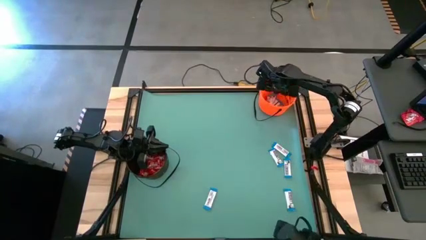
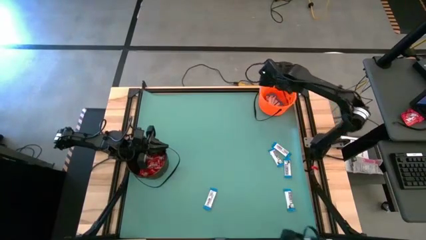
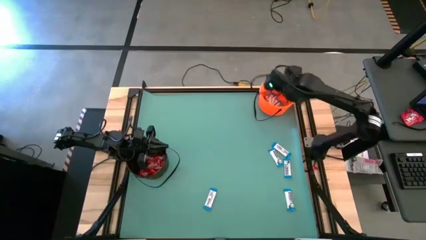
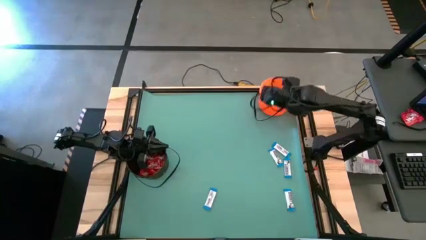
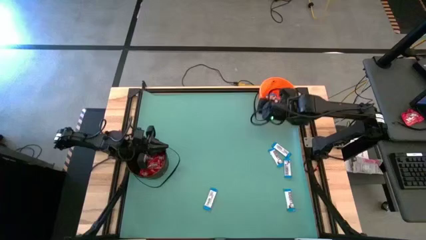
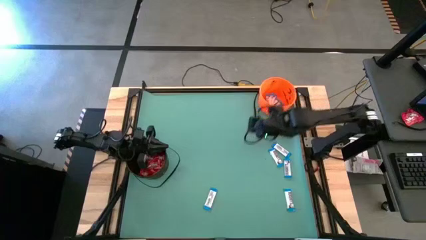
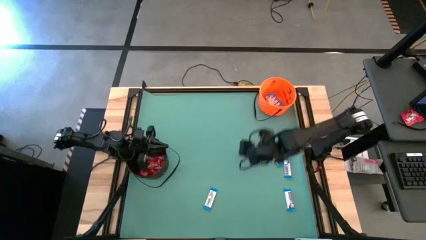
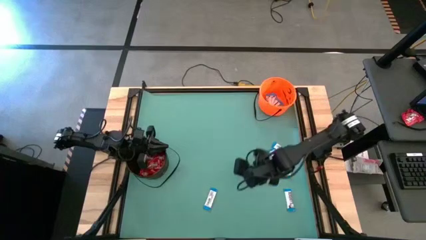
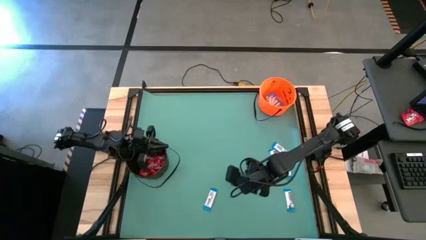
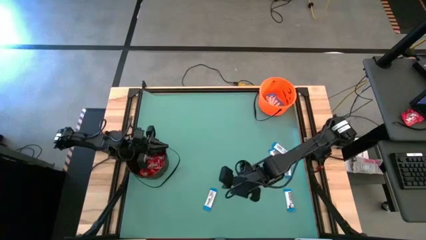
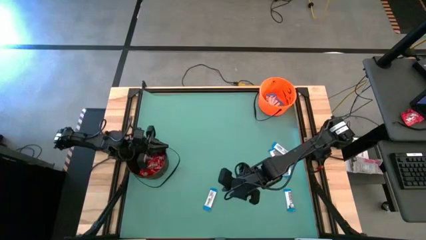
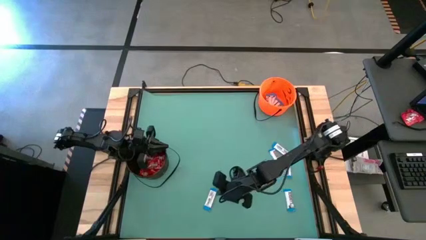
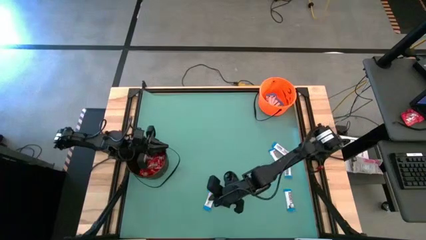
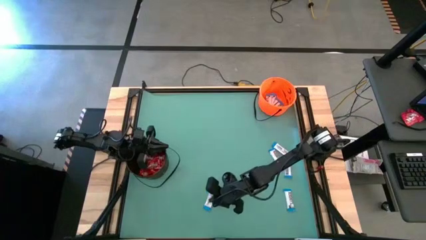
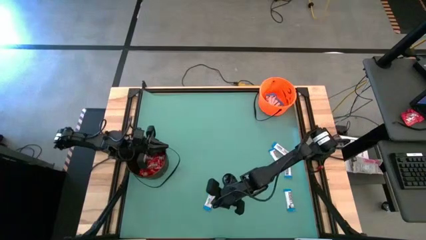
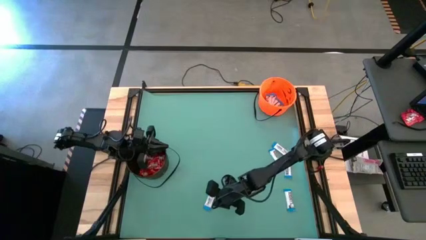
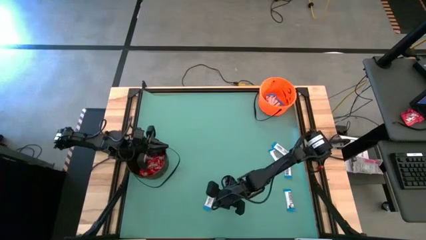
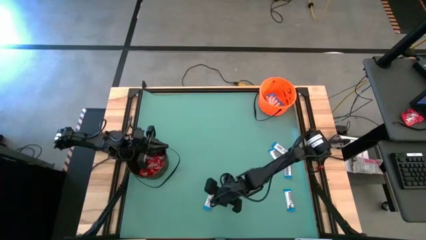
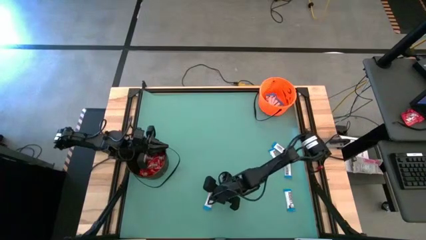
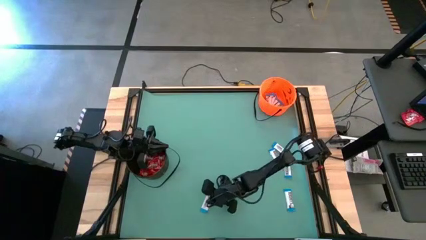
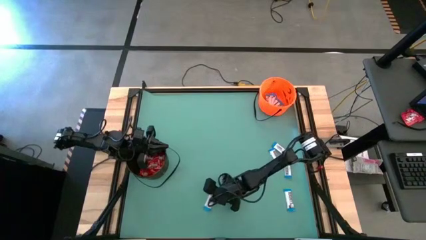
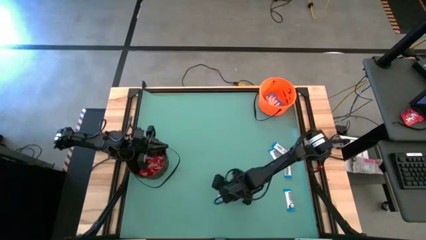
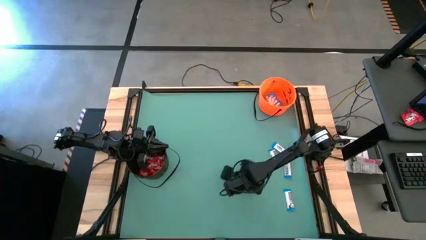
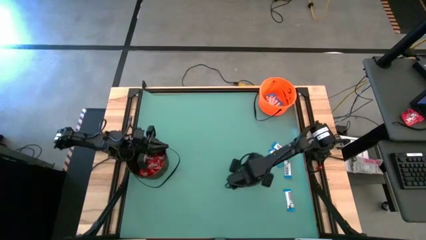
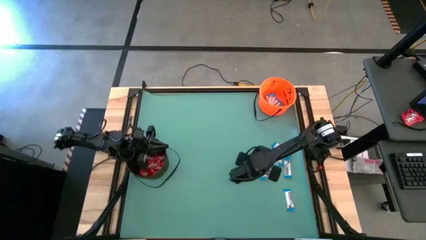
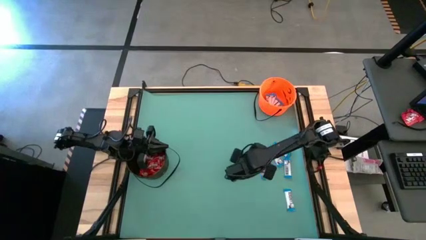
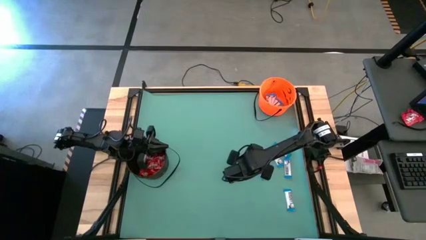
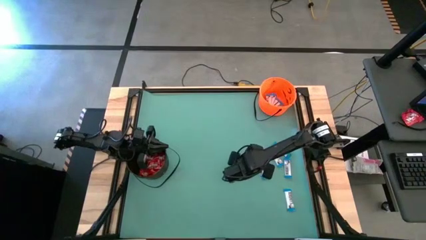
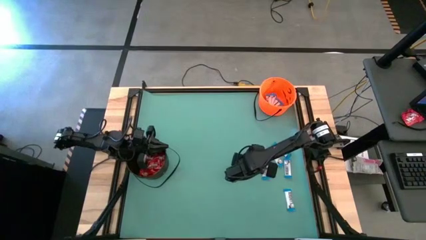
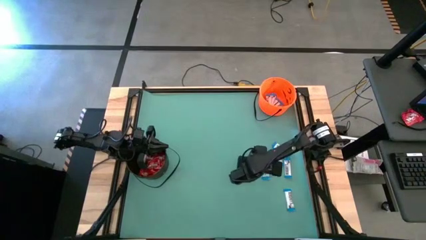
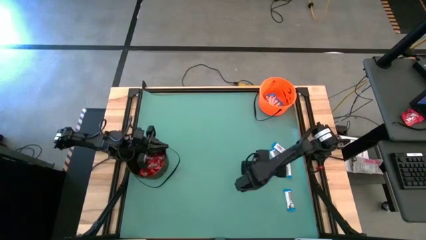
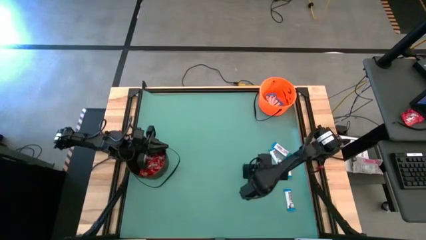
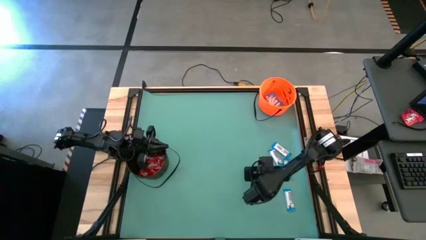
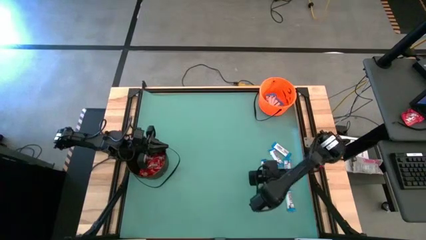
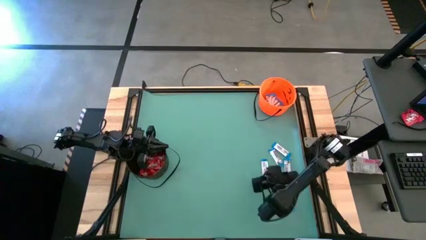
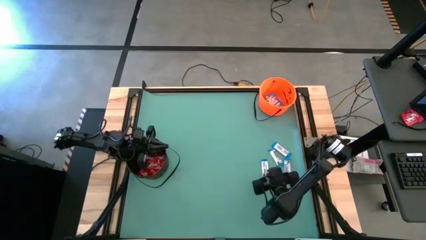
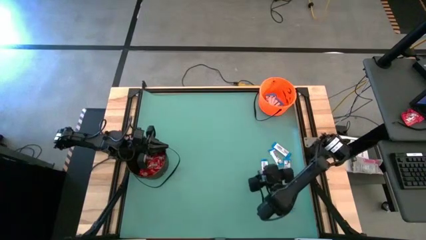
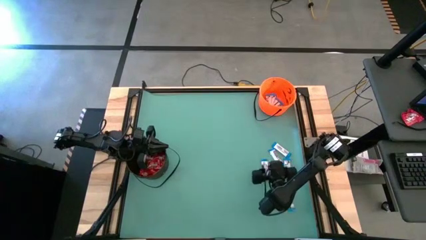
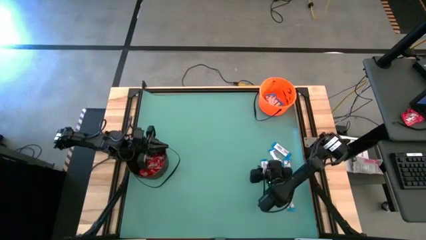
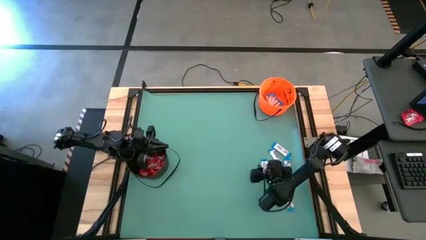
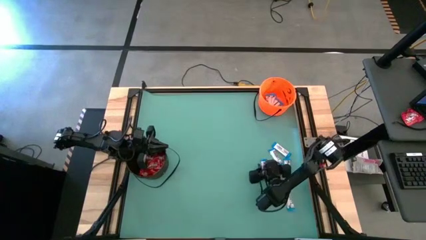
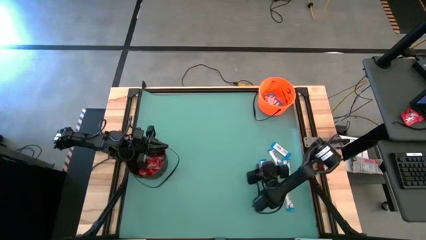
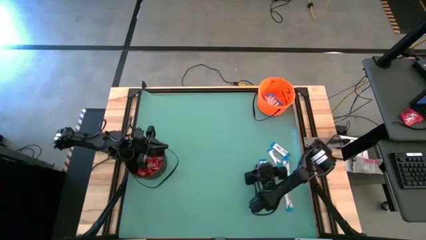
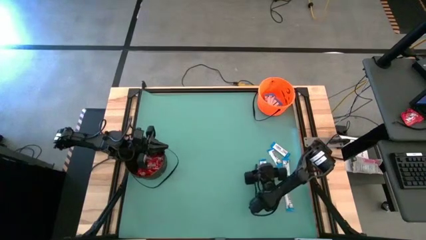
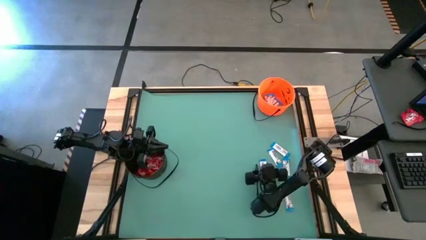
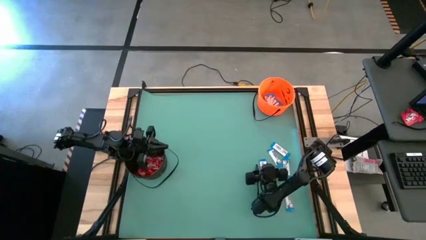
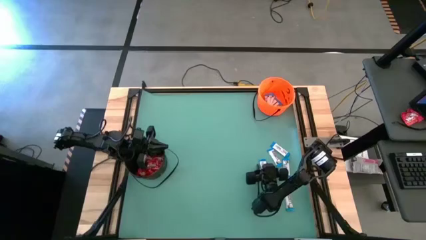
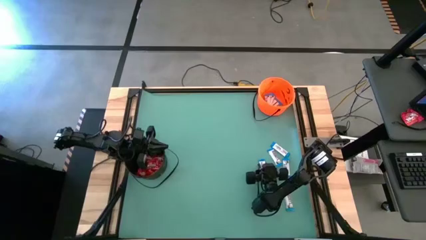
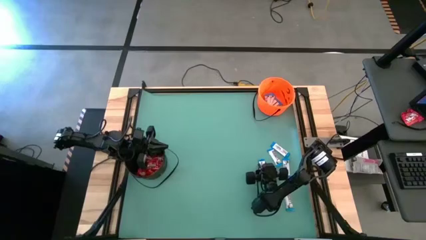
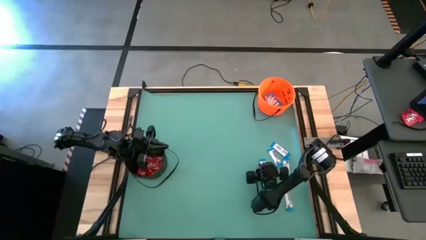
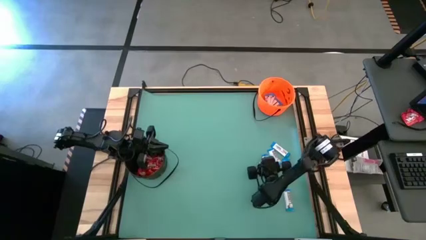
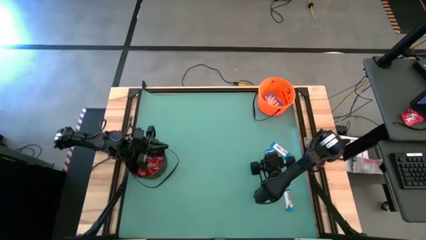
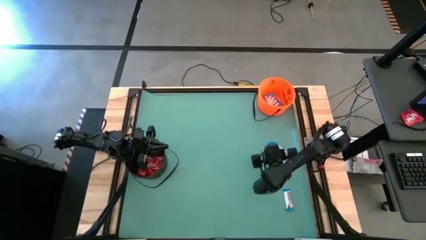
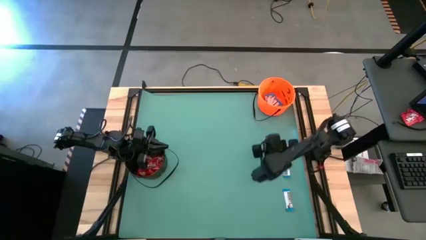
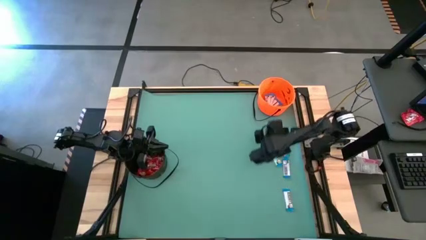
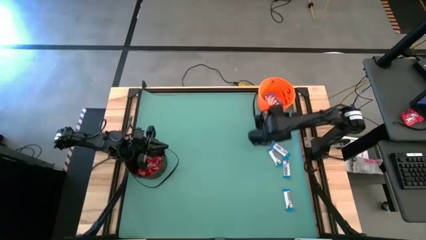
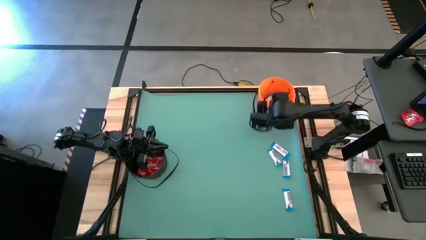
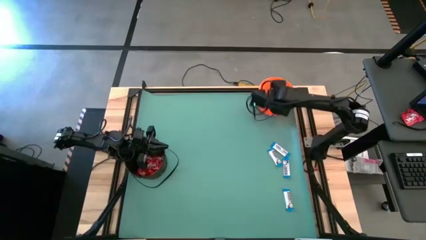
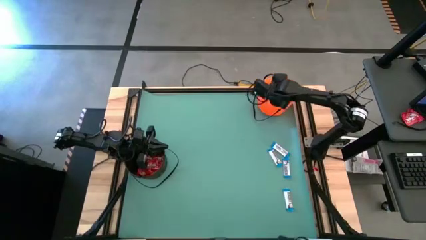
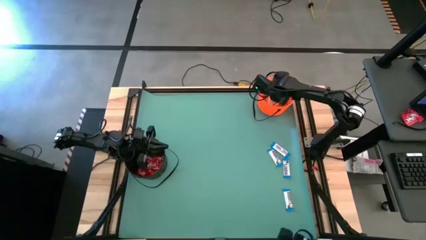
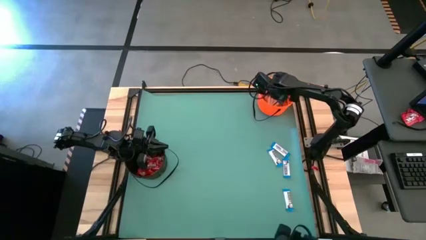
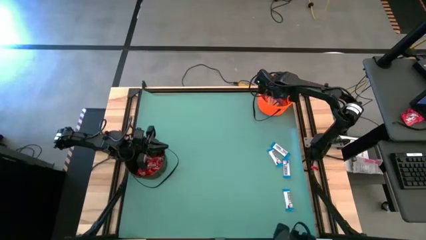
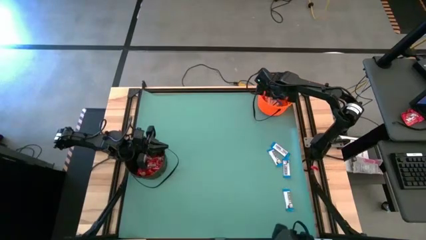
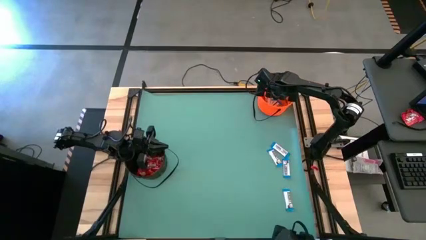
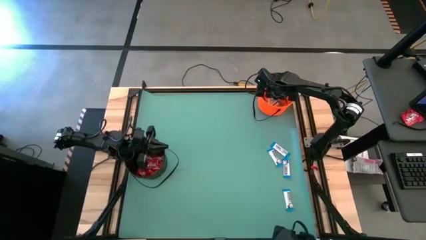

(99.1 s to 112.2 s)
Task: Sort candy by brand, put in halloween buckets
Put the white chocolate into the orange bucket

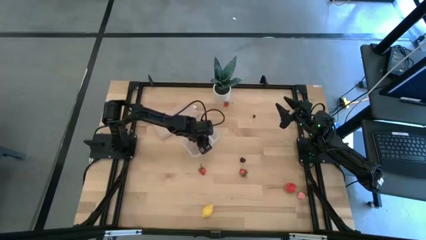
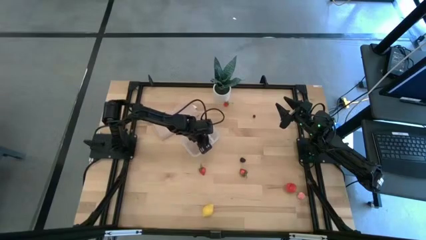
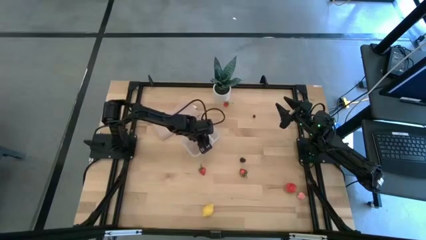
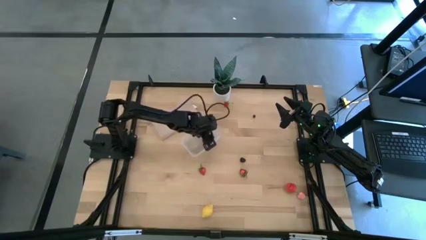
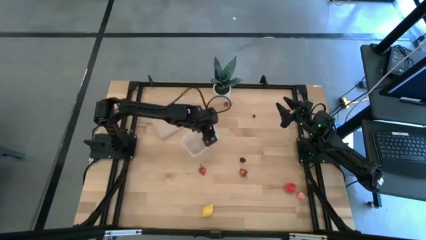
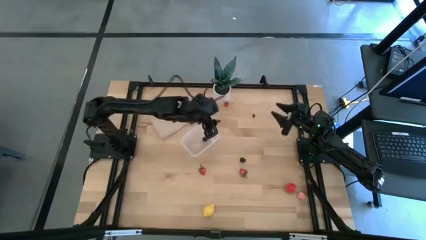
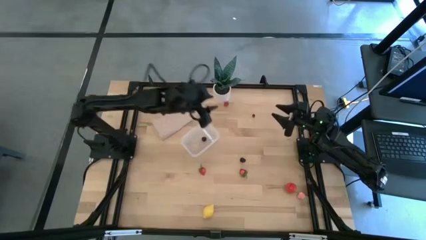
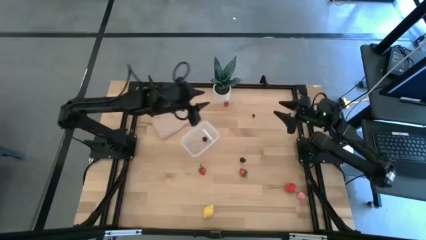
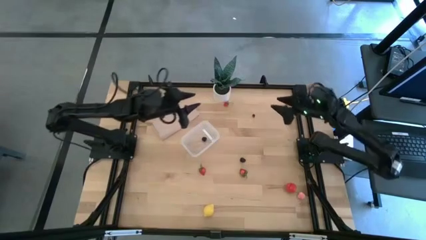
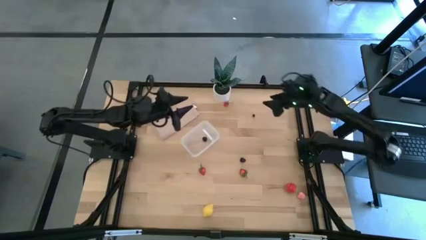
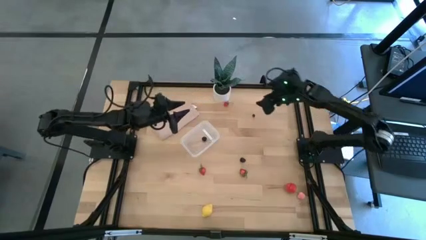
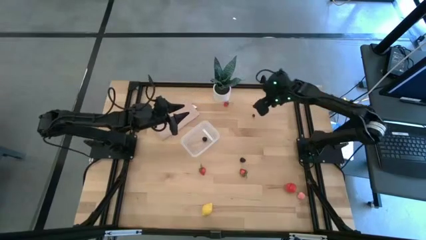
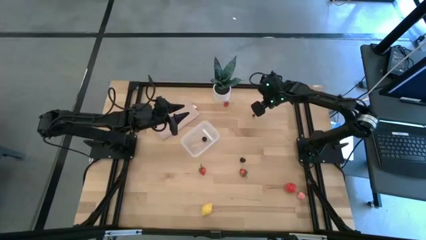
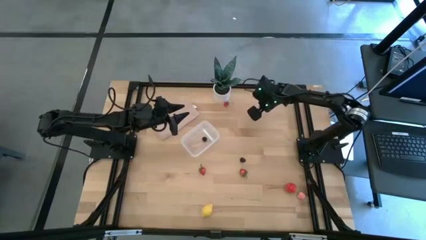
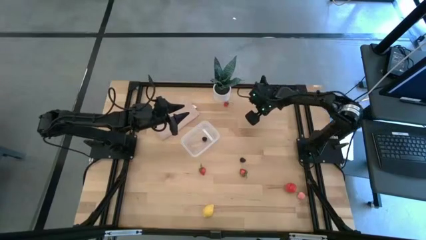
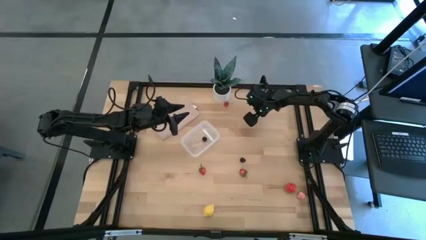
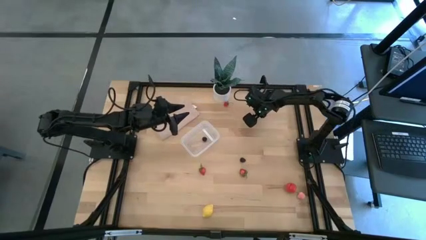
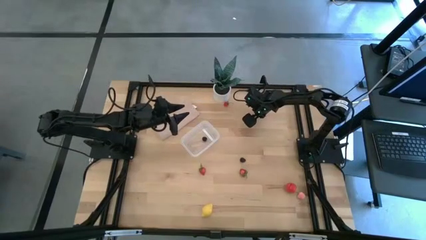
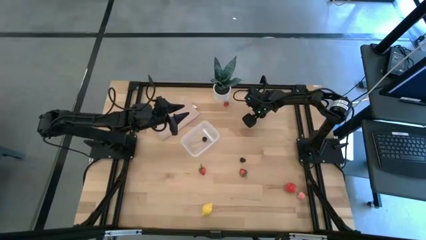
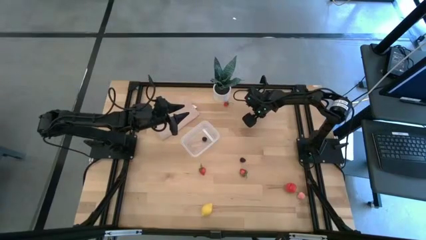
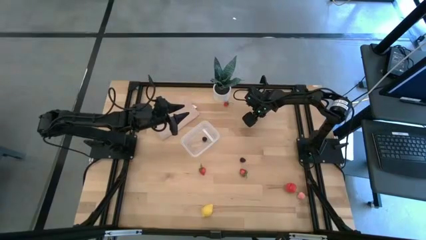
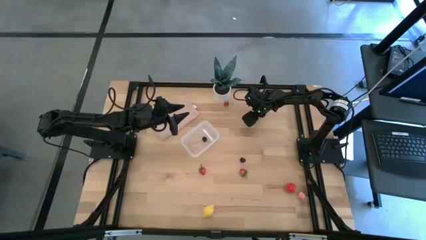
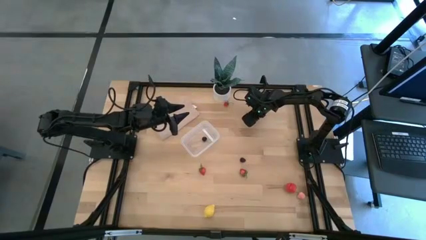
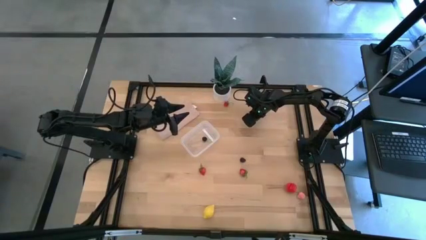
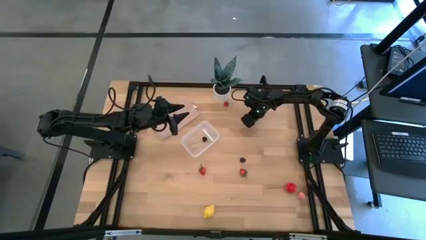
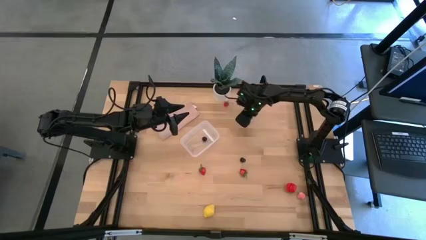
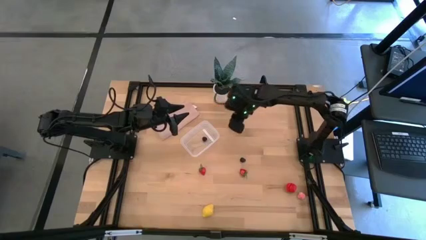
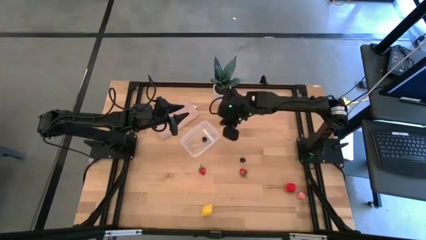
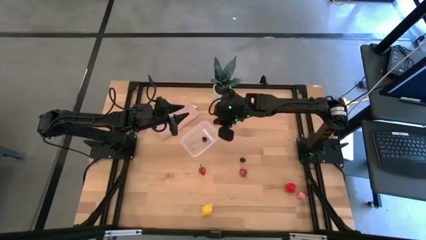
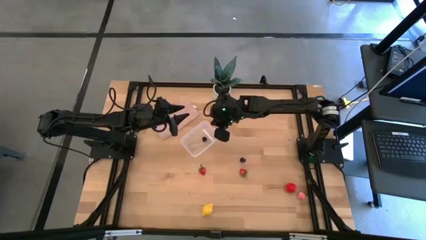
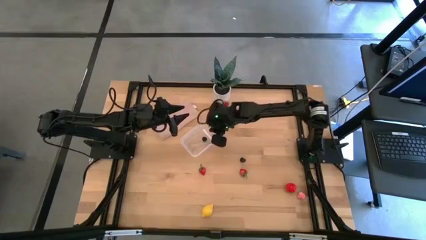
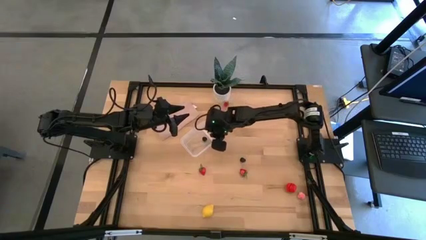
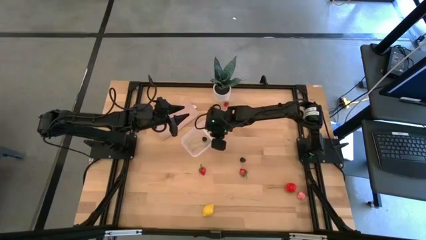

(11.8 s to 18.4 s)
Task: Pick and placing Produce into tupperware
Put the black berry into the transparent bin
